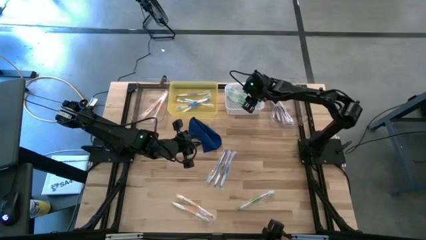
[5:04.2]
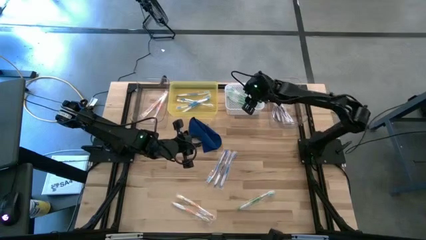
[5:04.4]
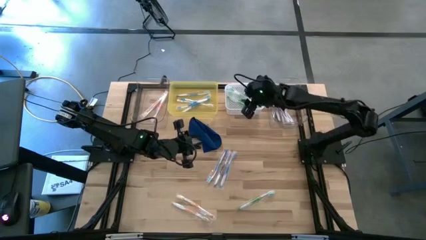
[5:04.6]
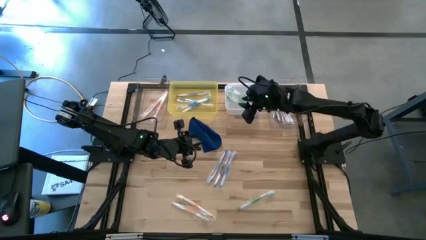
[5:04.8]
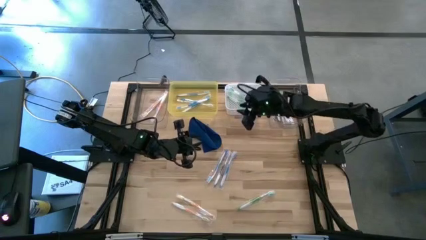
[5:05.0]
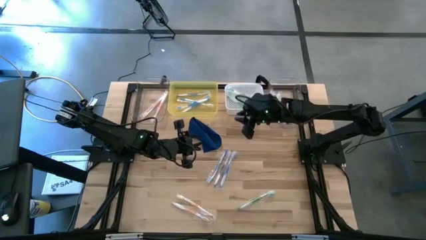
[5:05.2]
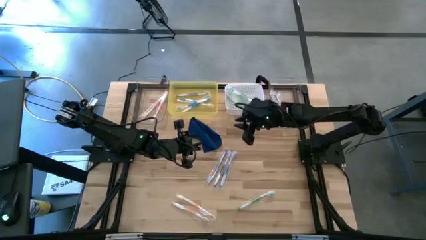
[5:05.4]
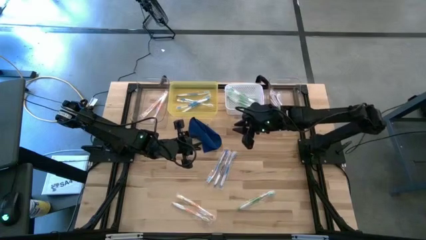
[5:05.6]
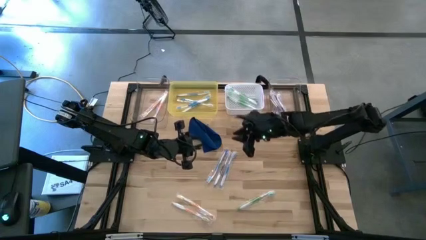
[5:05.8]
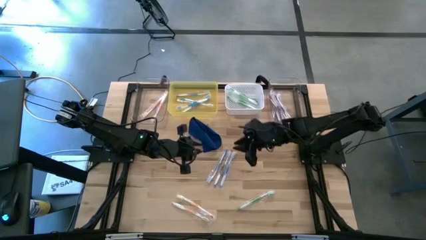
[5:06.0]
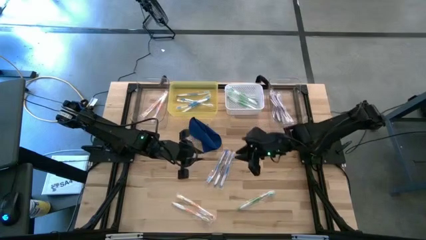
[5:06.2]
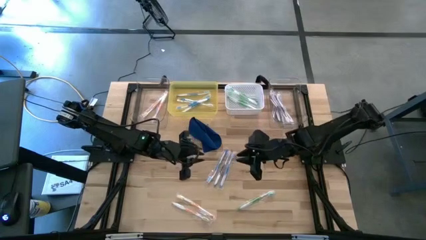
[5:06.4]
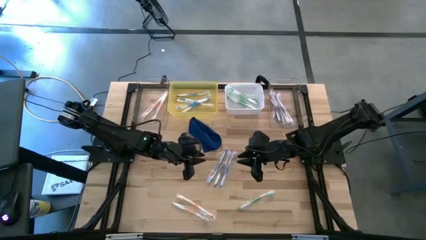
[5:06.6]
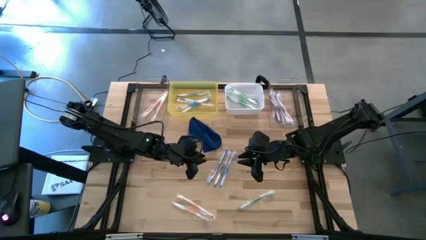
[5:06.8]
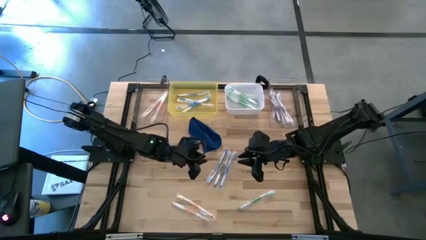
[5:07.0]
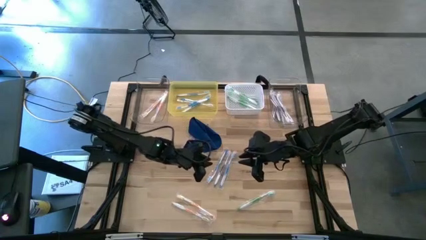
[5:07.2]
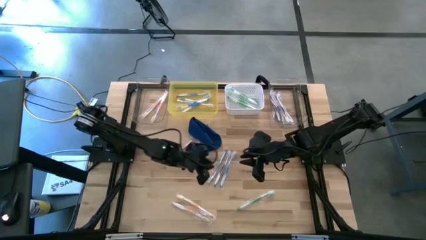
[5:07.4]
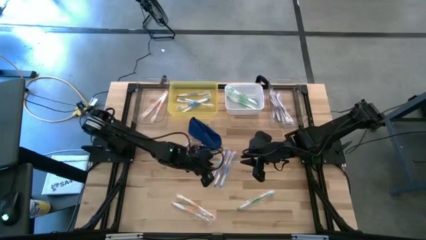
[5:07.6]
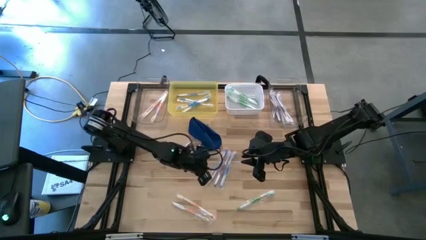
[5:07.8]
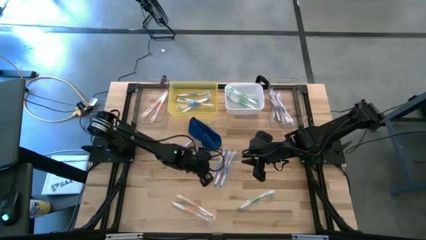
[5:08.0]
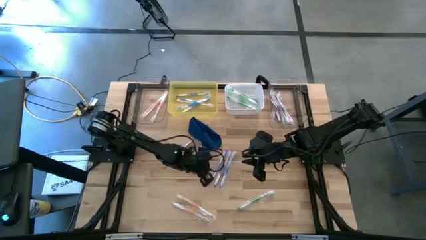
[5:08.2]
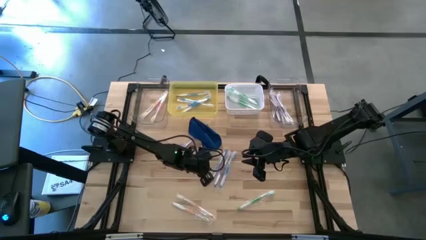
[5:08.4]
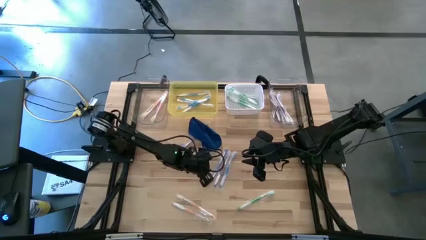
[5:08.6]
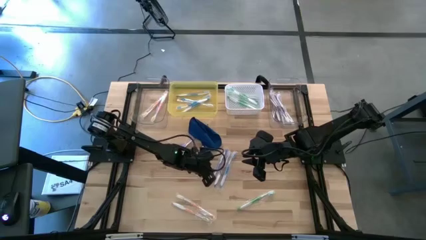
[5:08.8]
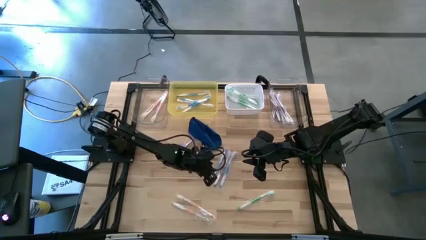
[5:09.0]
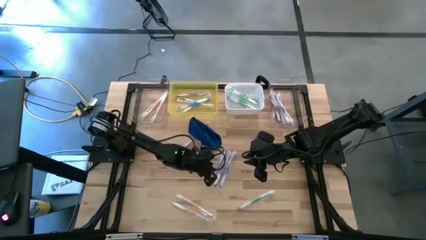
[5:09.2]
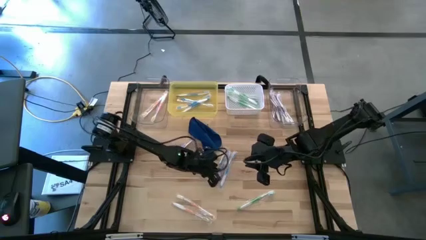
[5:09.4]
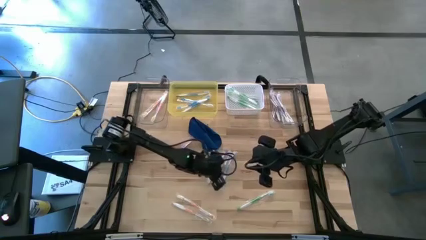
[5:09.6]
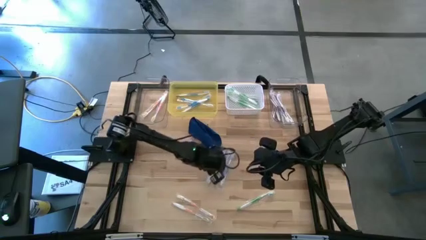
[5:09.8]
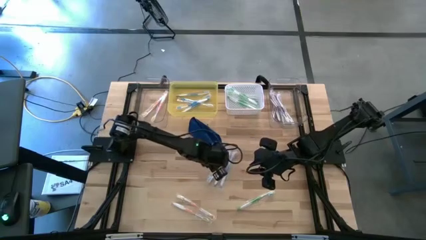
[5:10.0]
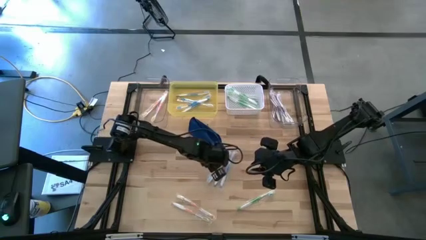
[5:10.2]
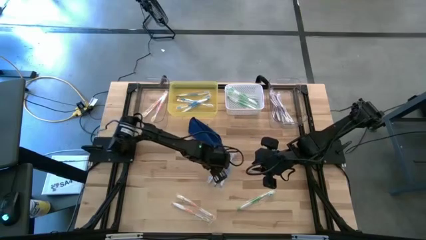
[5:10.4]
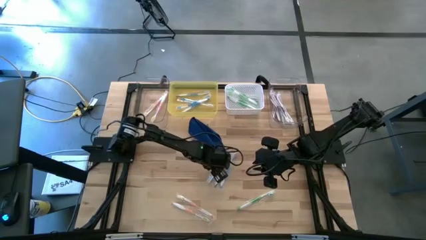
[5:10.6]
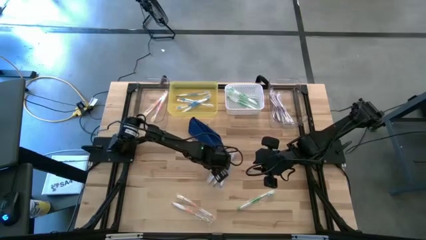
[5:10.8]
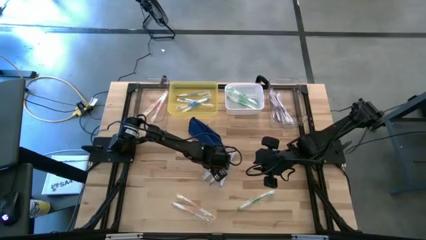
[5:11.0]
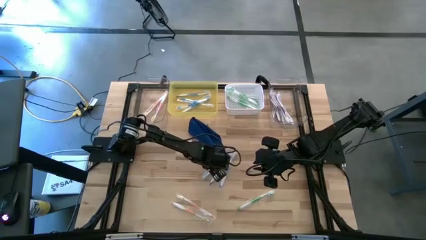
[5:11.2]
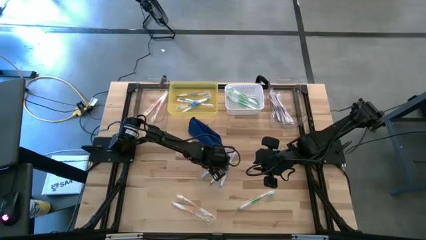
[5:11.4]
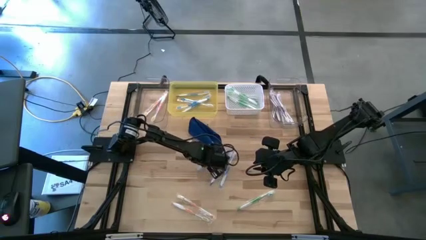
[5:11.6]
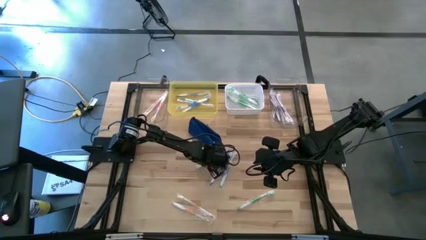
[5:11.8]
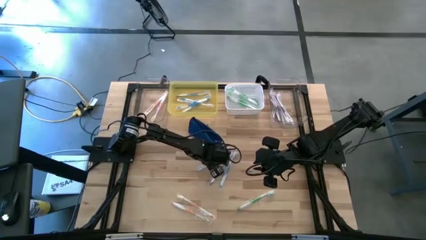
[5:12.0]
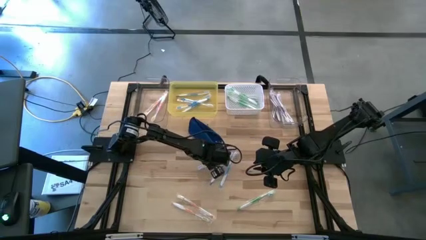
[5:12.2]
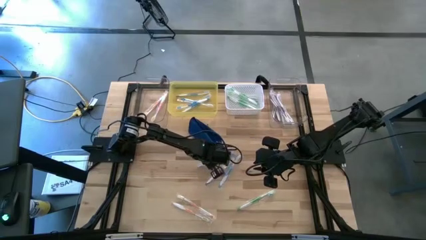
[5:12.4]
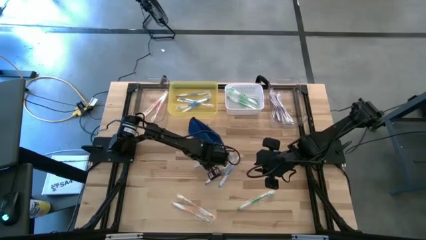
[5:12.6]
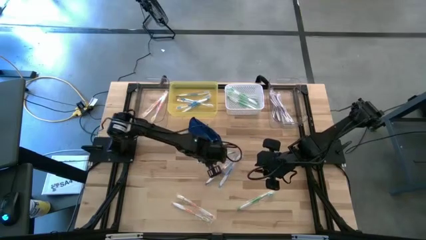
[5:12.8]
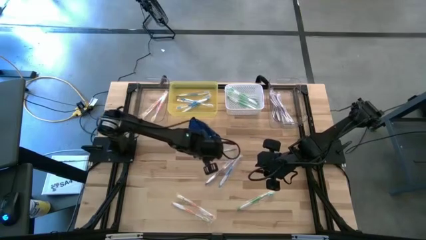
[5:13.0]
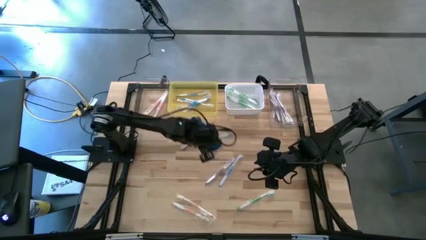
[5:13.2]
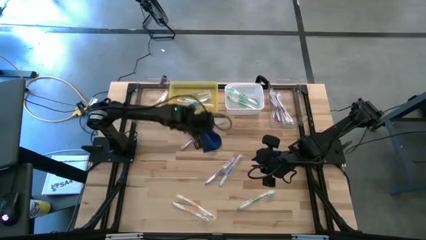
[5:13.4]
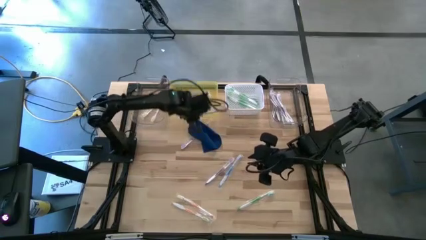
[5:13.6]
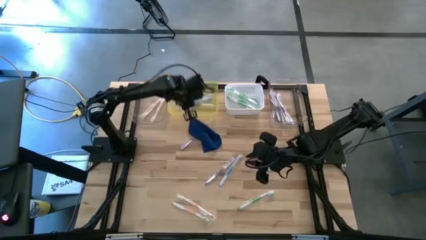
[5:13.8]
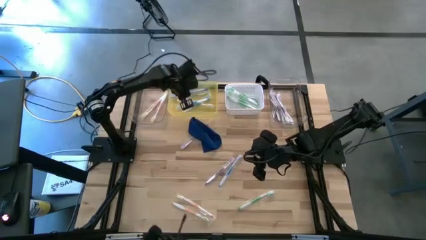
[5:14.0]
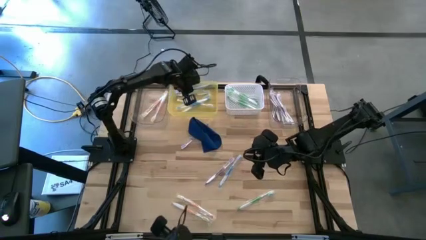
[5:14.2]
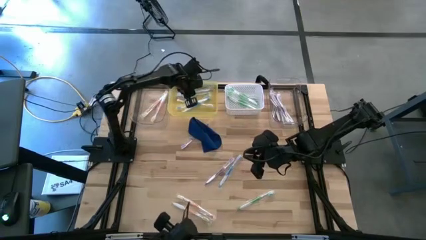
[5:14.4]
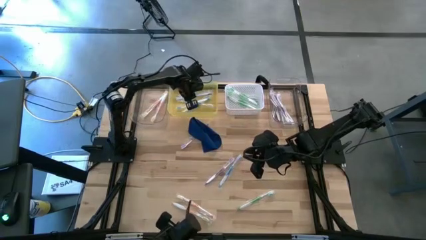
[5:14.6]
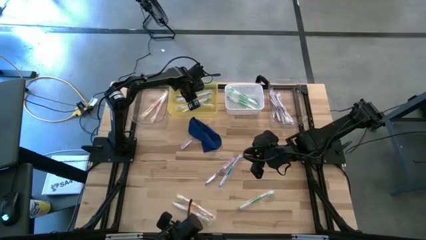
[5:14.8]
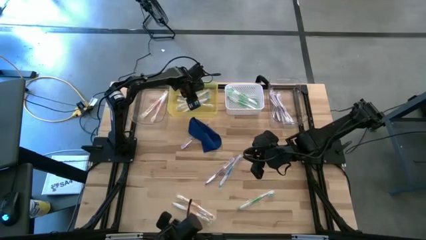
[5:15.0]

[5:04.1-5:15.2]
Task: Pick & Place Toothbrushes
Put the blue toothbrush into the yellow bin

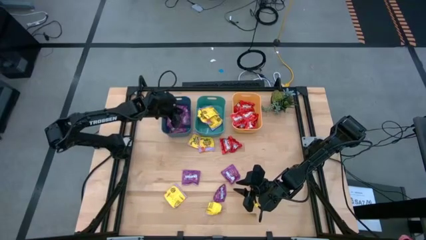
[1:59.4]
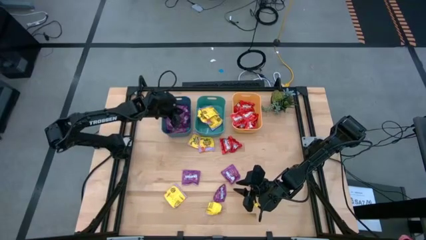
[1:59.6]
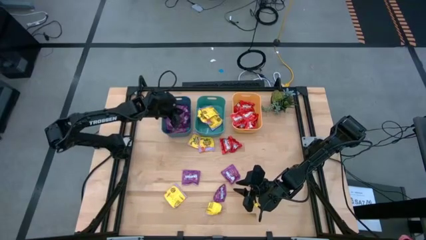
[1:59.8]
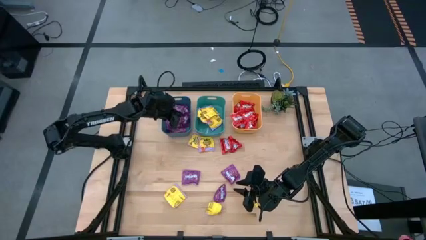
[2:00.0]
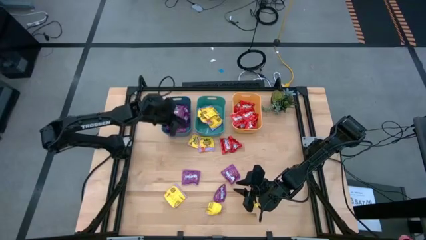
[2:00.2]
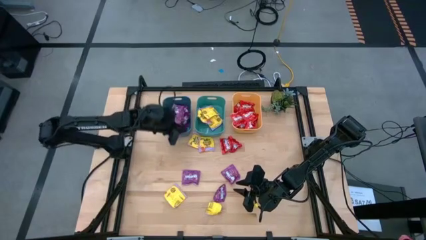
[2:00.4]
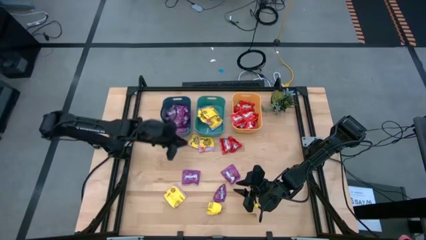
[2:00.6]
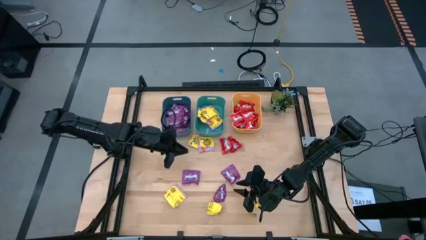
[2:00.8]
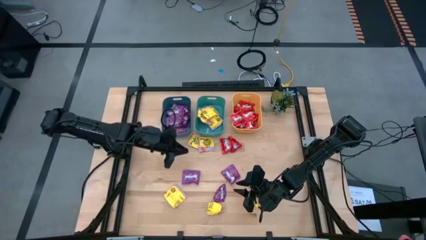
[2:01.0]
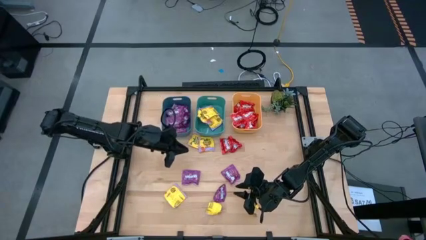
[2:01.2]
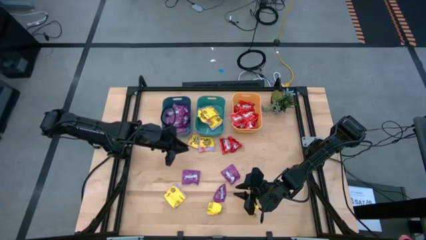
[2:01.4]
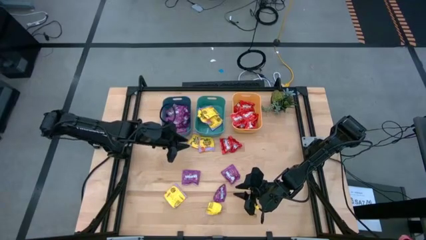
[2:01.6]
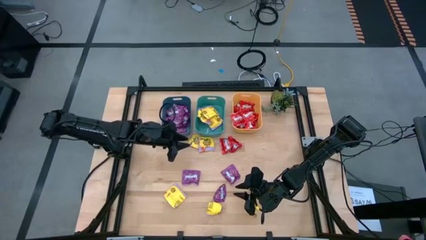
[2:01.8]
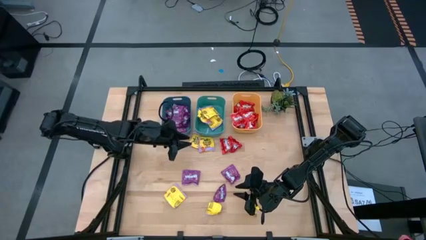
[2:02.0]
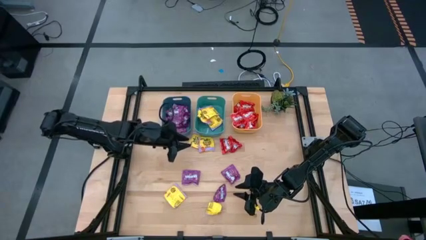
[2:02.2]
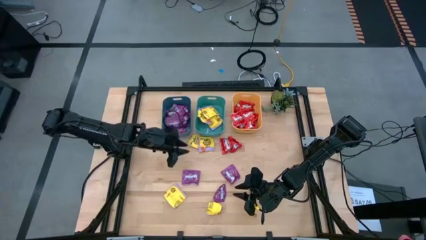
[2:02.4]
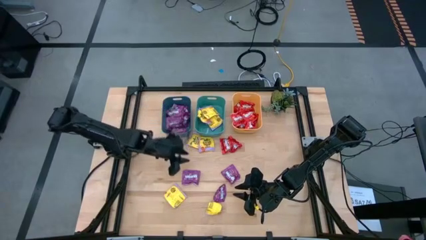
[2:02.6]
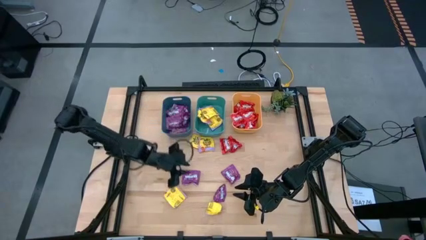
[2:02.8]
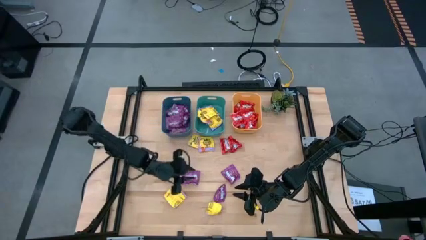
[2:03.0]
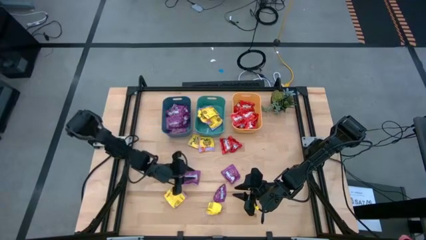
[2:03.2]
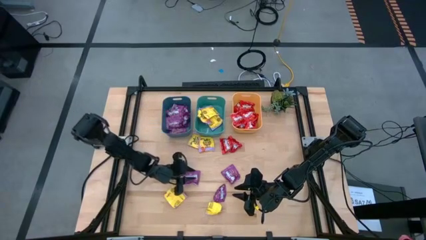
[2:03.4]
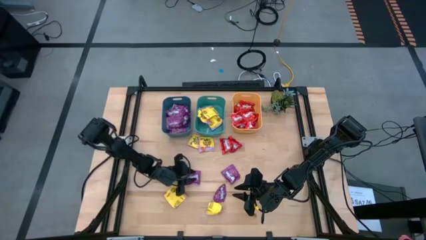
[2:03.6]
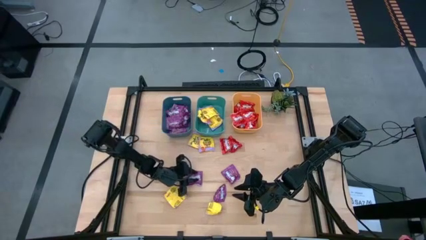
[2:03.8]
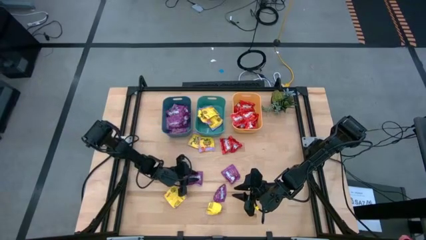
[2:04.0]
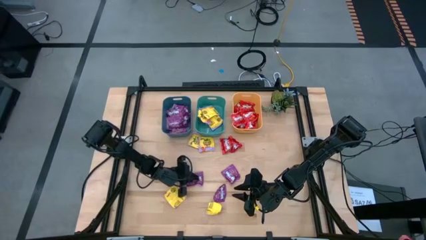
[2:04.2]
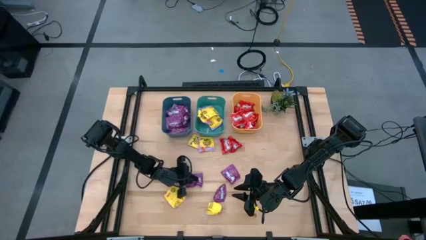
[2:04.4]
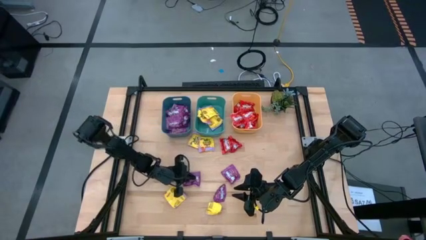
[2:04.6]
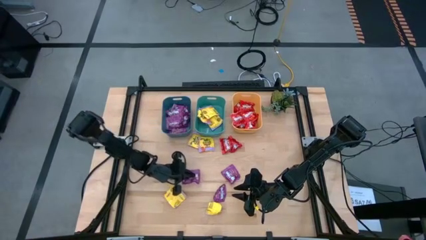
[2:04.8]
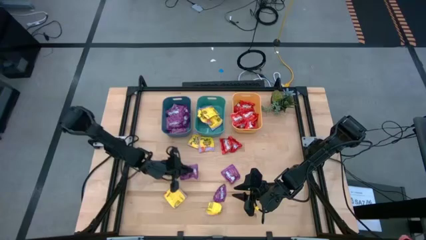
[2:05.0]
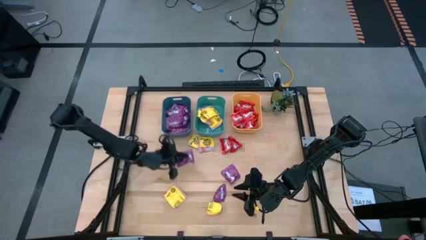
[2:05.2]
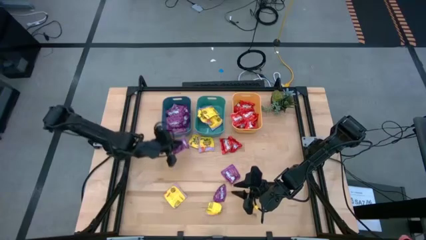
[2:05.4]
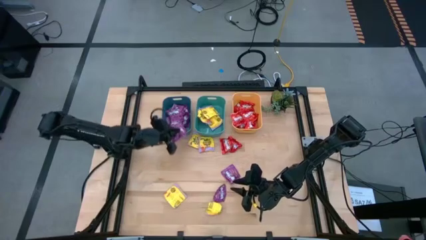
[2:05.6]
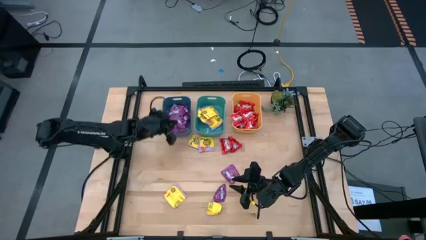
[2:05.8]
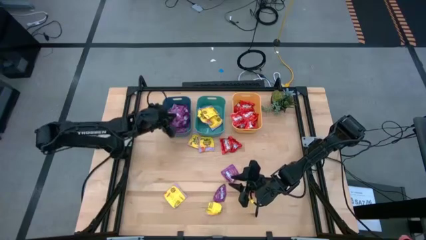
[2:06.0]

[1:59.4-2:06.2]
Task: Sort candy
Put the violet candy into the blue bin
